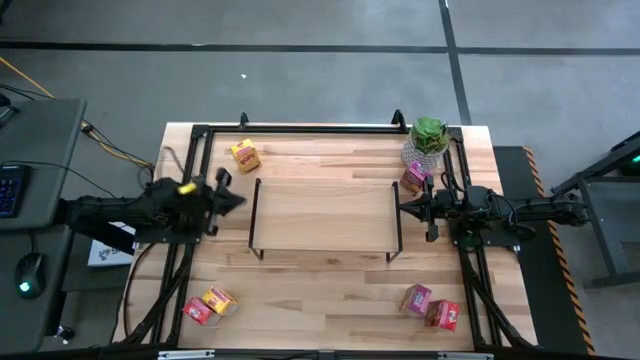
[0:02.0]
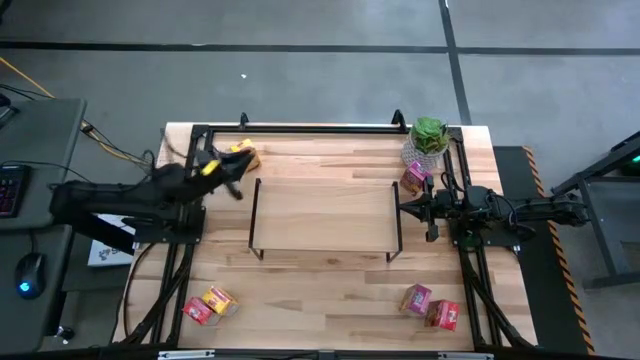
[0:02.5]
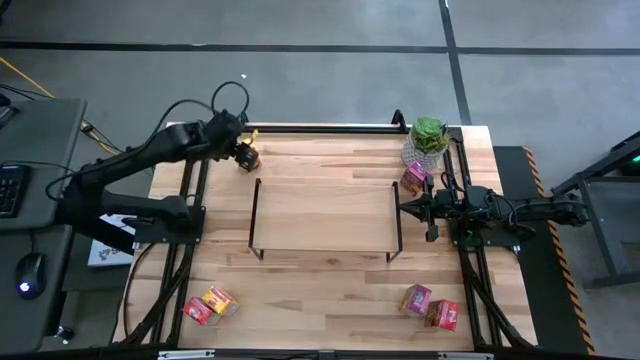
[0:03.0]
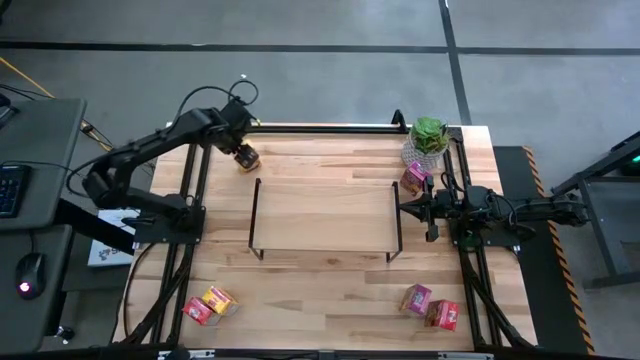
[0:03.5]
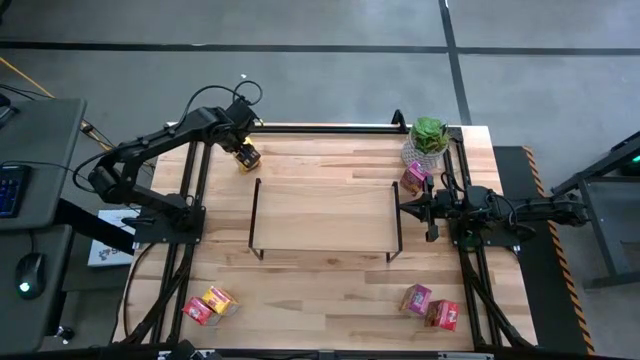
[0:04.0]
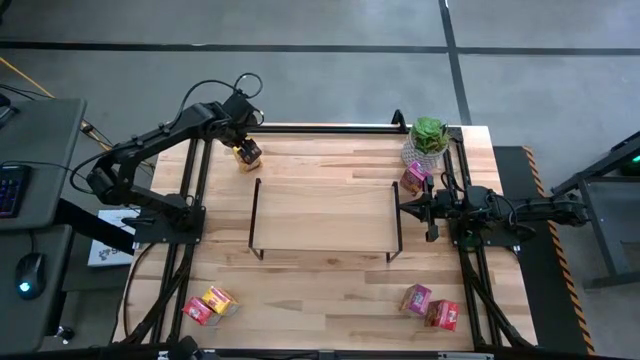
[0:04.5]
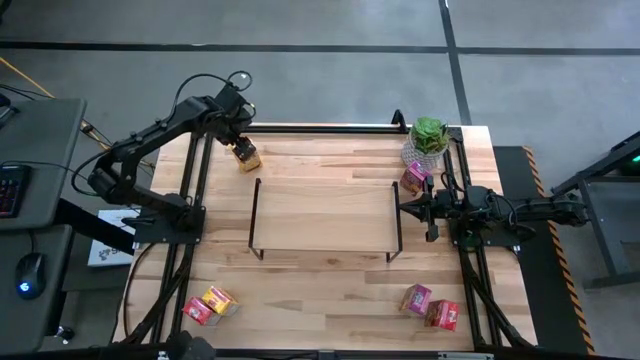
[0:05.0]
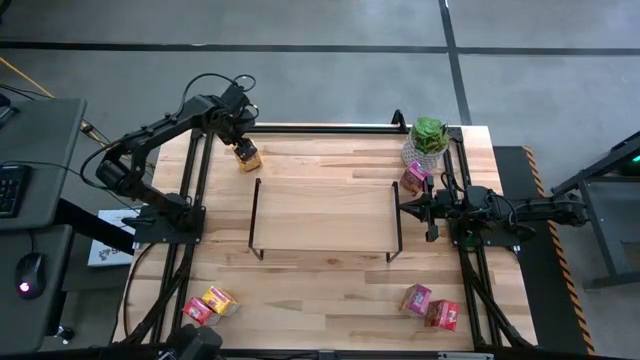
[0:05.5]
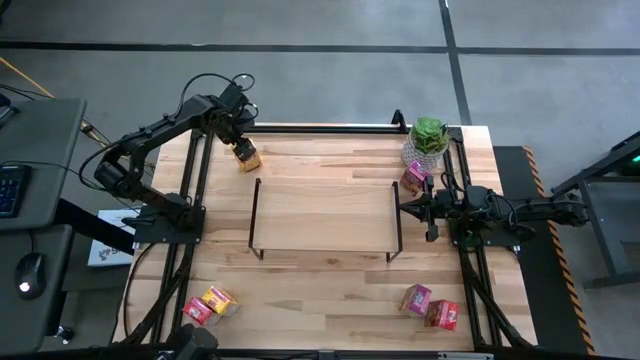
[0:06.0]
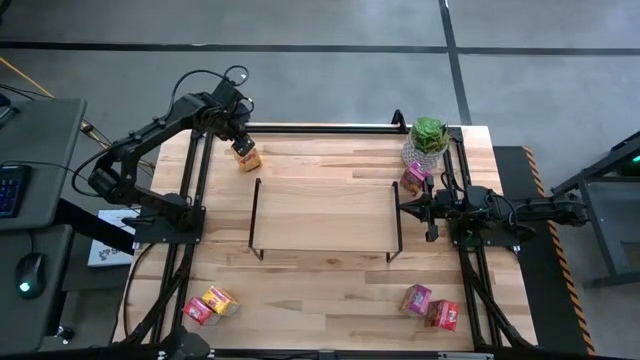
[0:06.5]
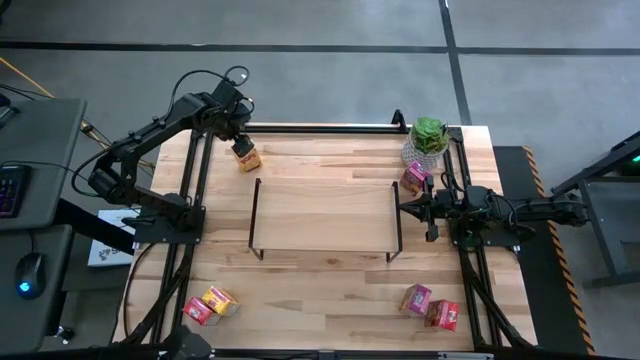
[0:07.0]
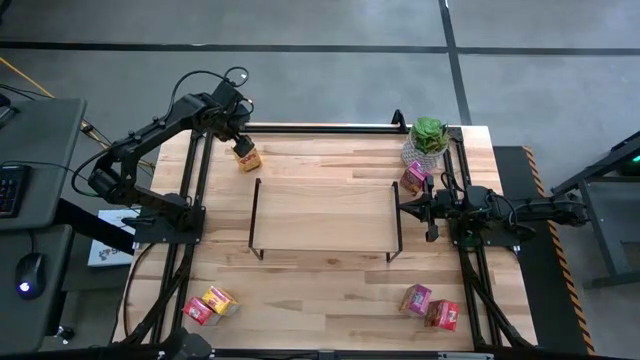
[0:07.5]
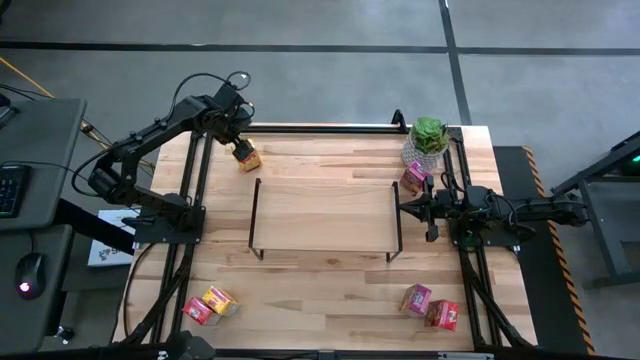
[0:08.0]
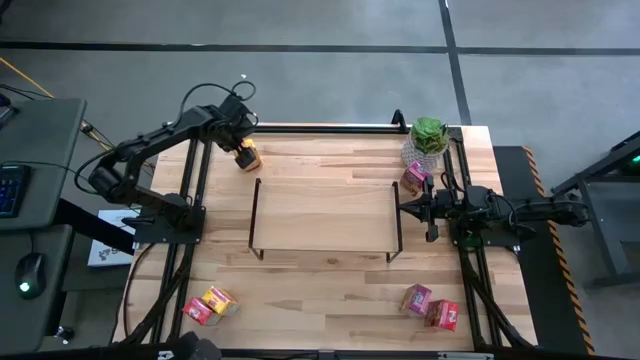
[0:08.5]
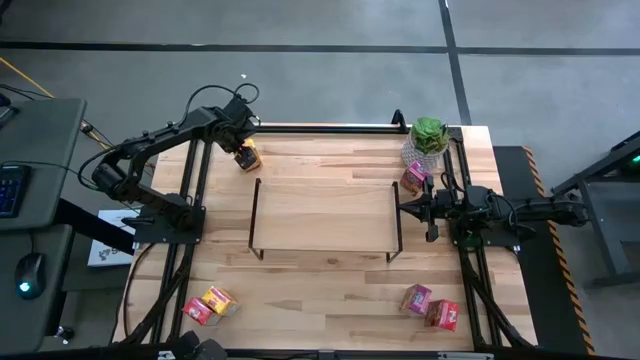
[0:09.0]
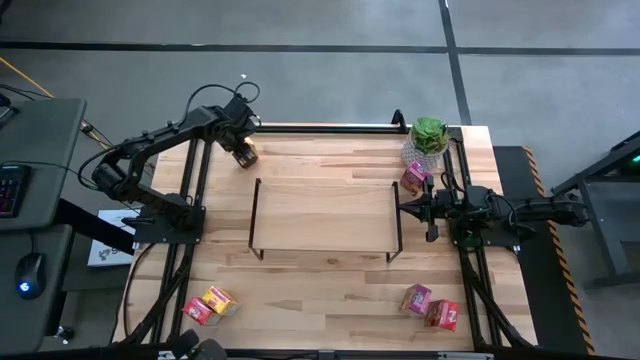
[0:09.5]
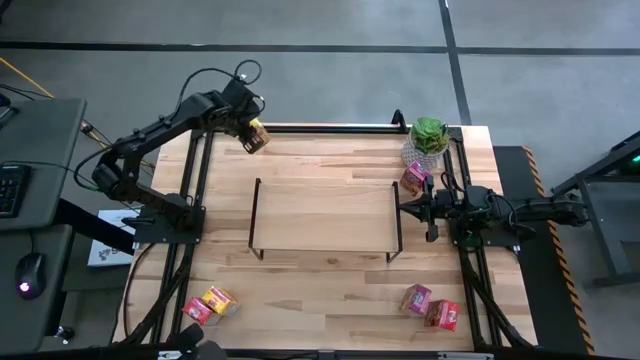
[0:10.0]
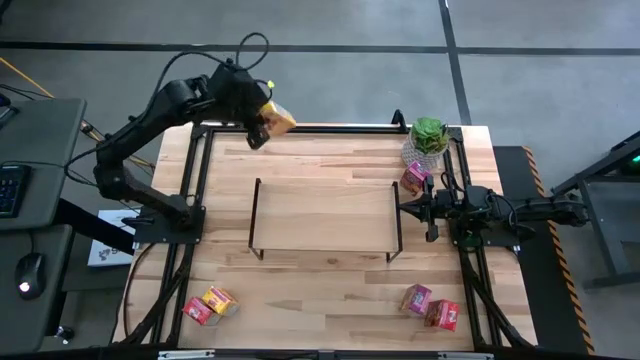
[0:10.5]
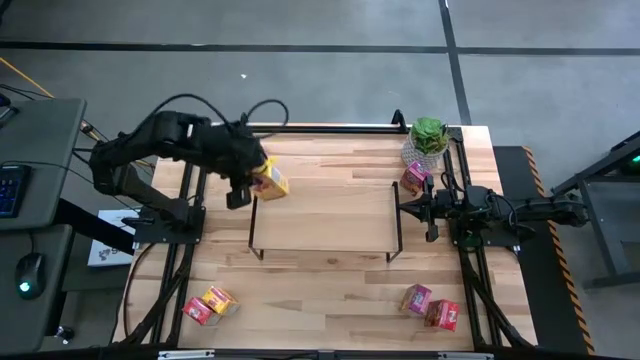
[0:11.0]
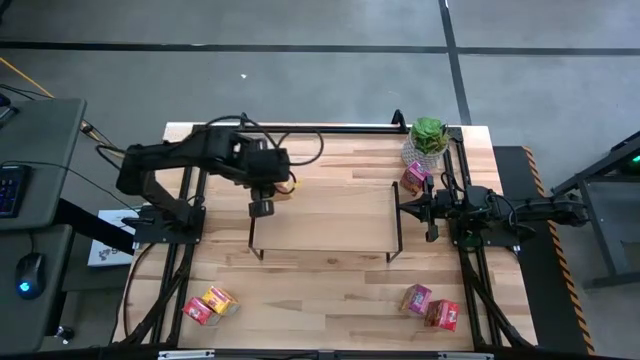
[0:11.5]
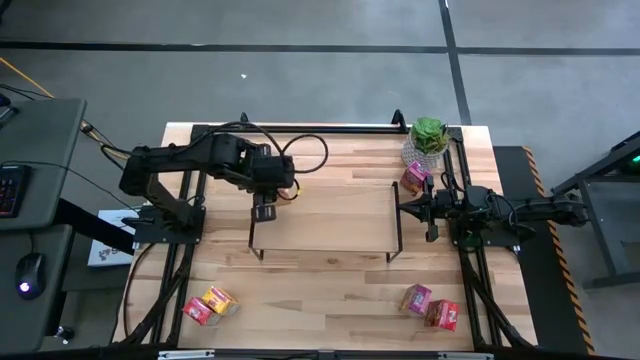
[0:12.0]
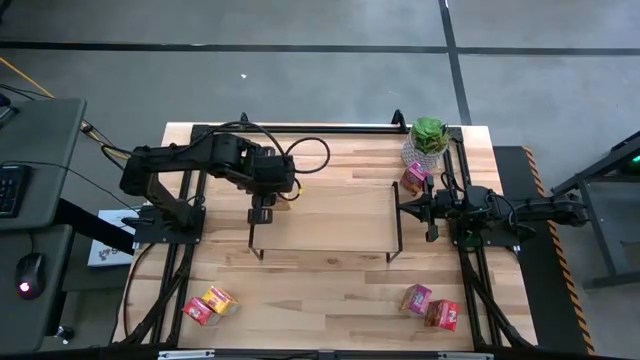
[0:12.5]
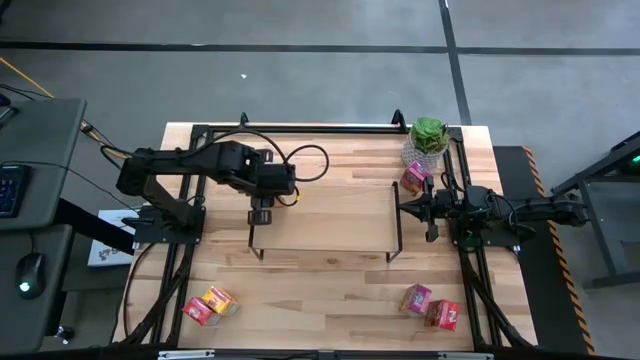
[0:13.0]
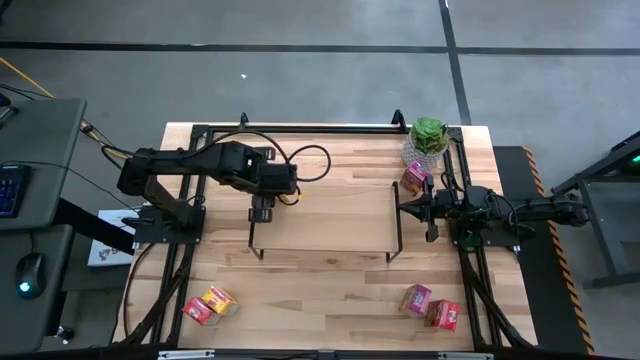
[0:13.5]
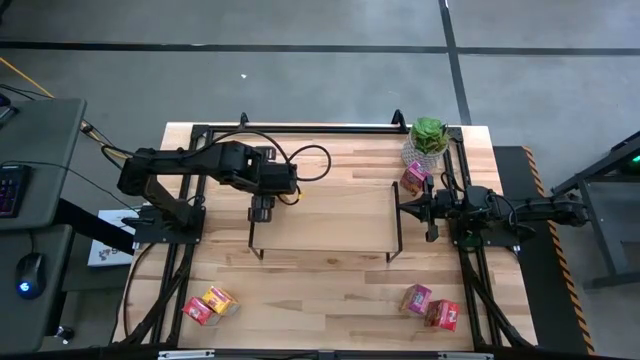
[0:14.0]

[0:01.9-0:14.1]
Task: Stack cereal on shelf
Put the top yellow cereal box on the shelf

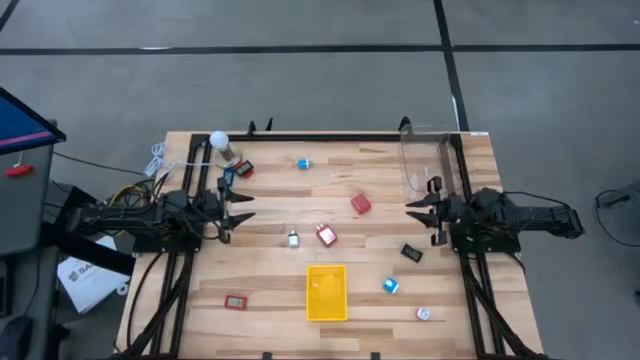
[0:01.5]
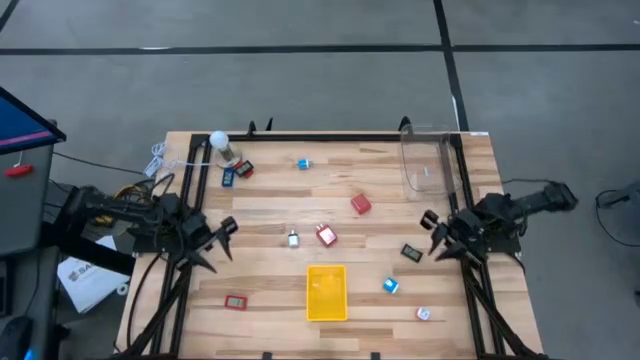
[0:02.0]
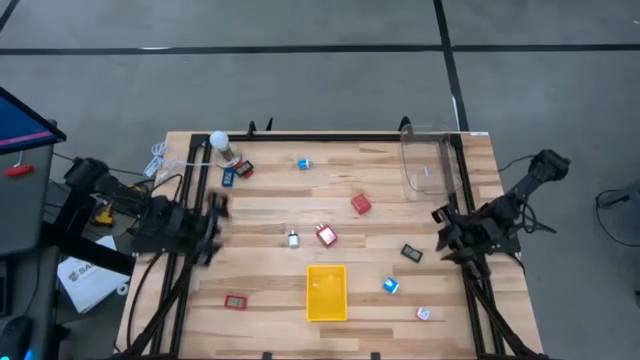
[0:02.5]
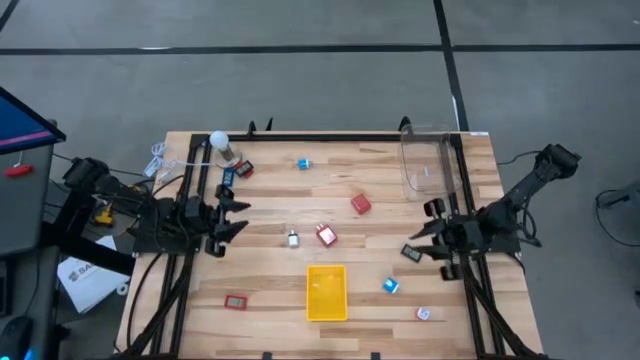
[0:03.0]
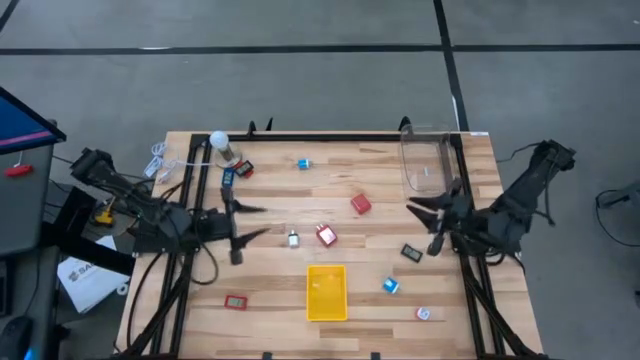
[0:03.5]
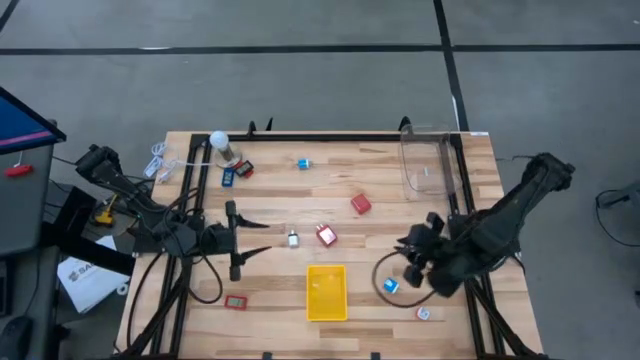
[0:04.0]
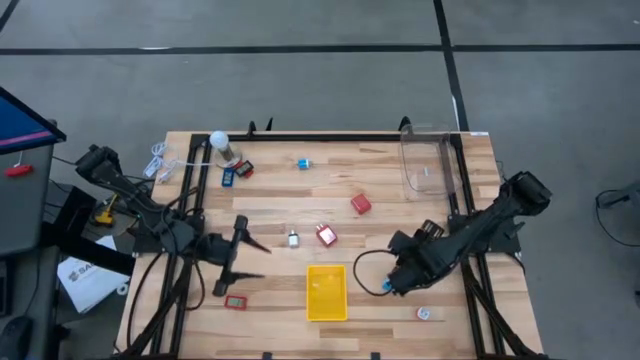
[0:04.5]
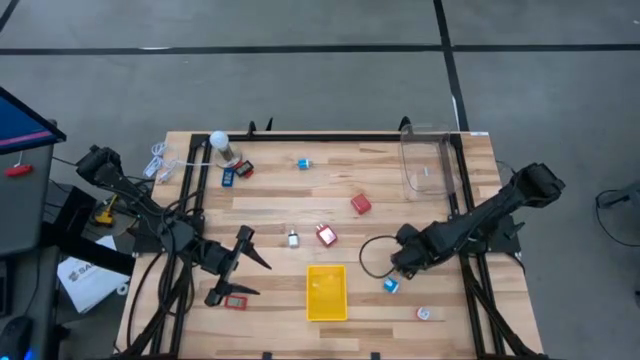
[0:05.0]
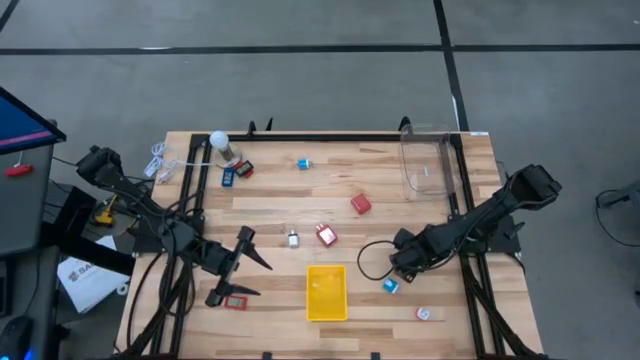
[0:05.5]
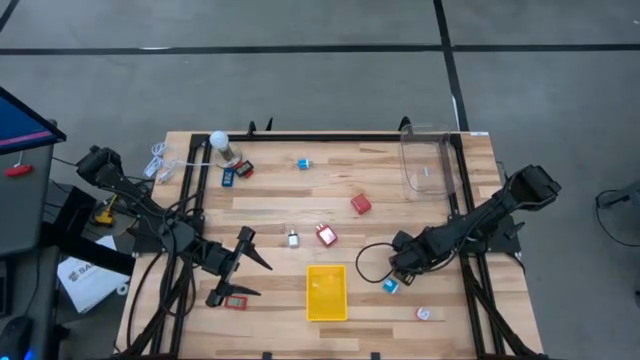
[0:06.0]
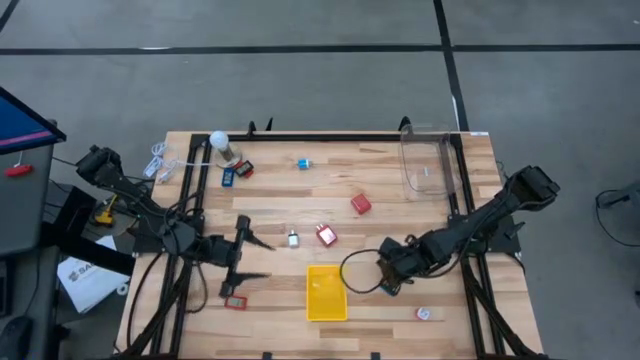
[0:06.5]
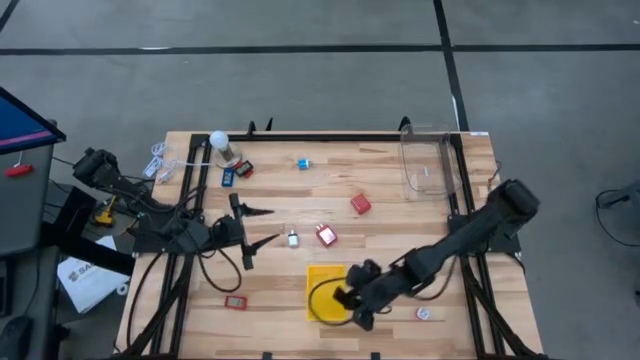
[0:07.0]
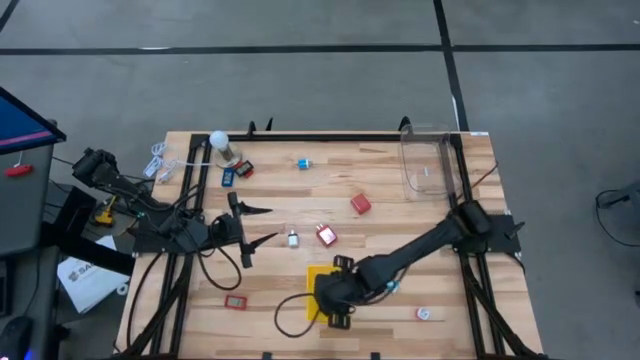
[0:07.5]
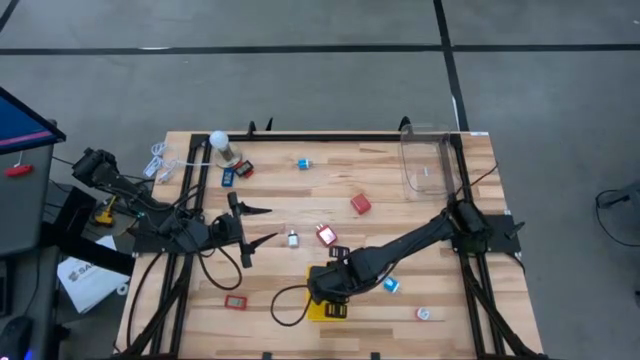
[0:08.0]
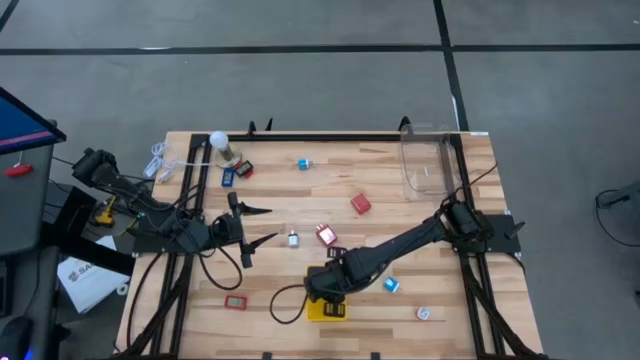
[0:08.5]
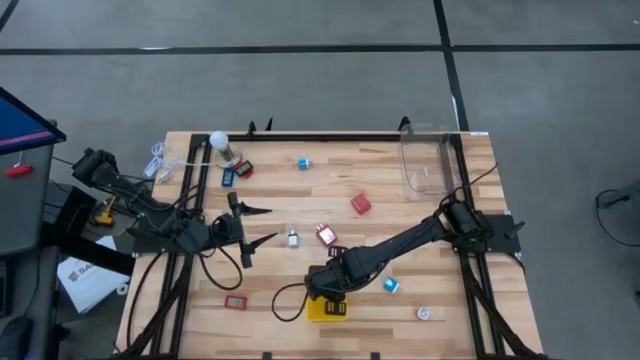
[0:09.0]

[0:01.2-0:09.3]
Task: Pick & Place Office items
Put the right black digital timer into the yellow bin
